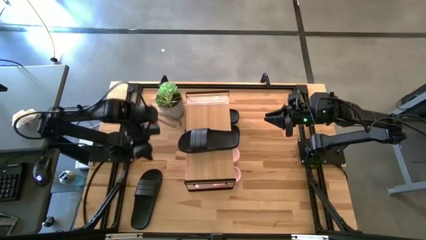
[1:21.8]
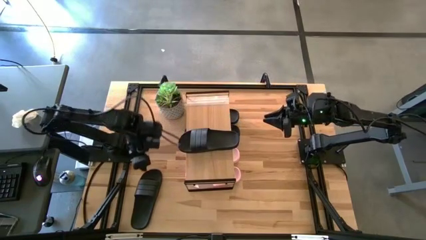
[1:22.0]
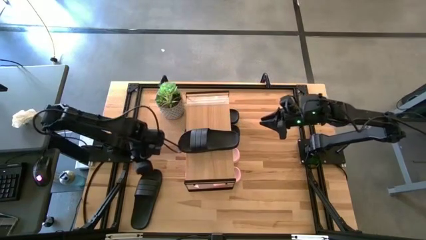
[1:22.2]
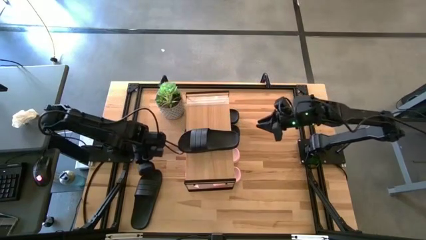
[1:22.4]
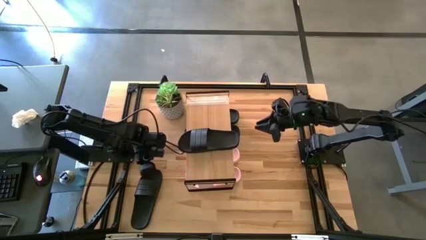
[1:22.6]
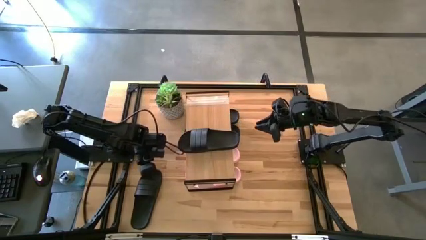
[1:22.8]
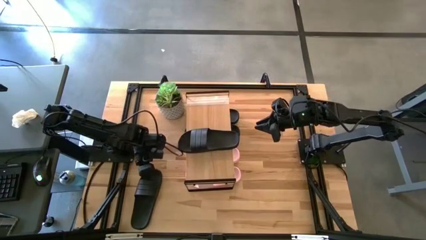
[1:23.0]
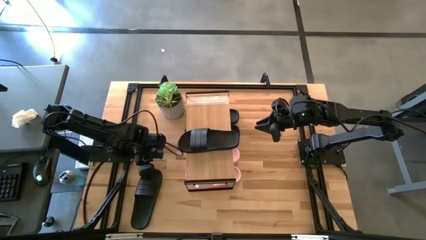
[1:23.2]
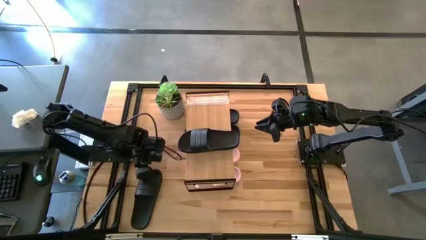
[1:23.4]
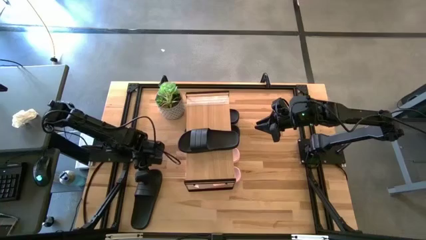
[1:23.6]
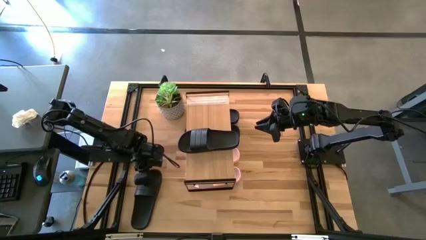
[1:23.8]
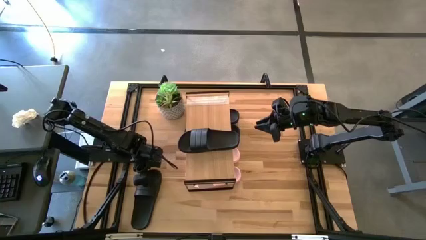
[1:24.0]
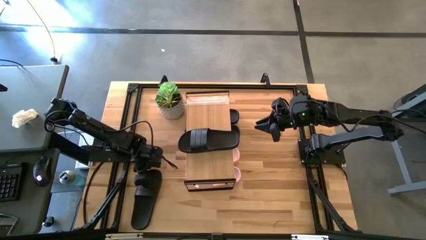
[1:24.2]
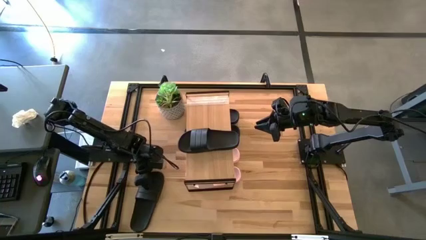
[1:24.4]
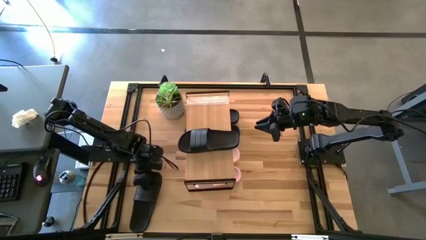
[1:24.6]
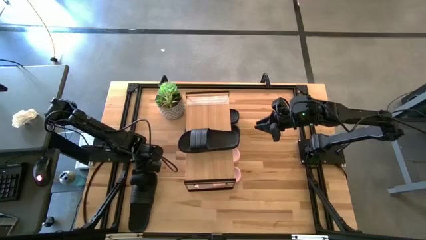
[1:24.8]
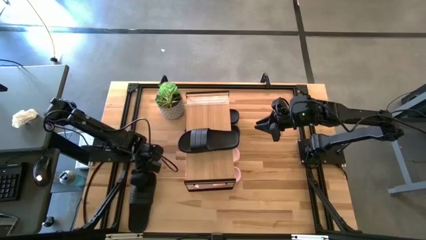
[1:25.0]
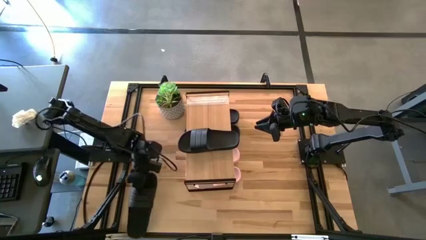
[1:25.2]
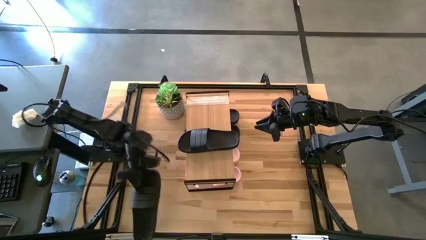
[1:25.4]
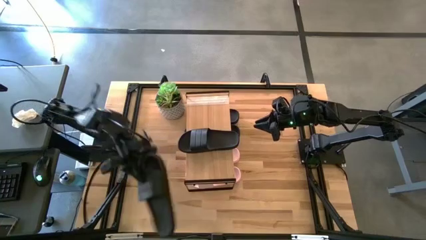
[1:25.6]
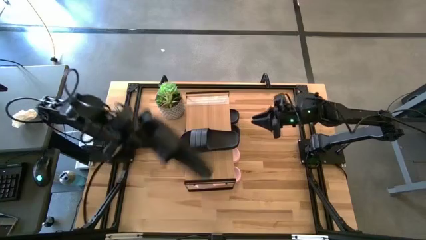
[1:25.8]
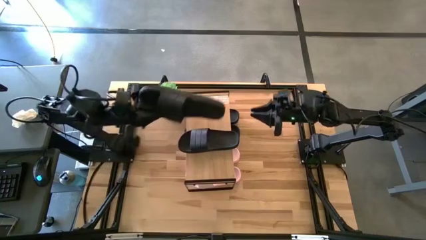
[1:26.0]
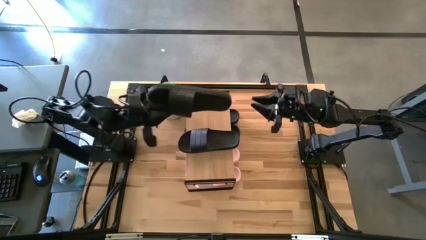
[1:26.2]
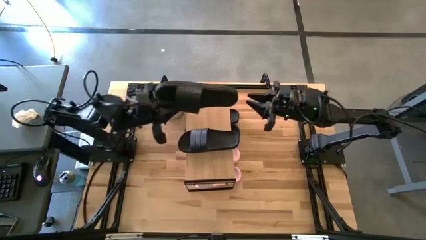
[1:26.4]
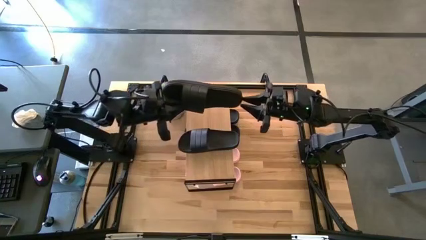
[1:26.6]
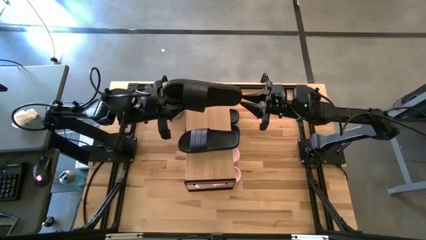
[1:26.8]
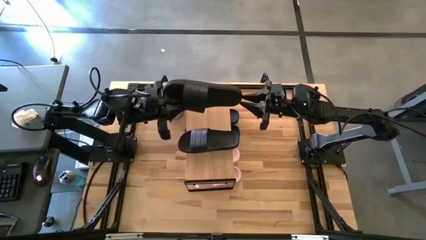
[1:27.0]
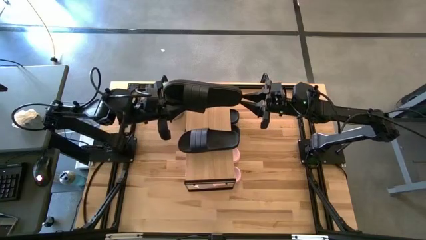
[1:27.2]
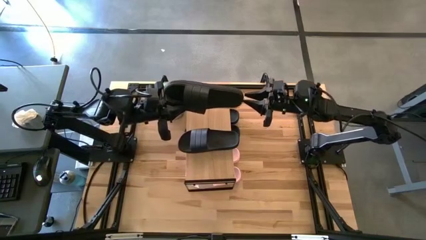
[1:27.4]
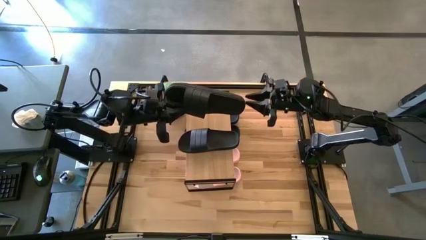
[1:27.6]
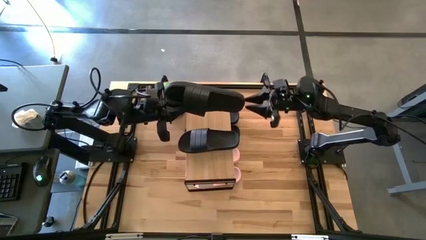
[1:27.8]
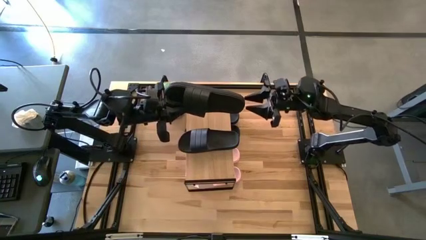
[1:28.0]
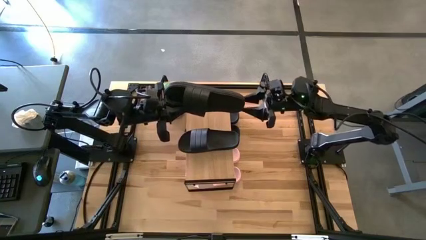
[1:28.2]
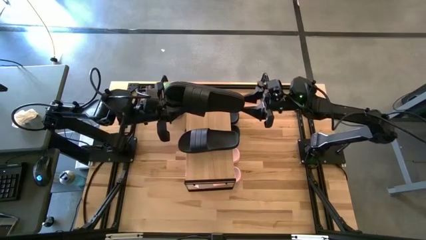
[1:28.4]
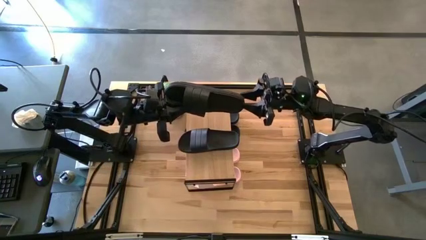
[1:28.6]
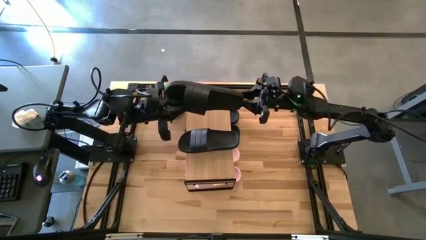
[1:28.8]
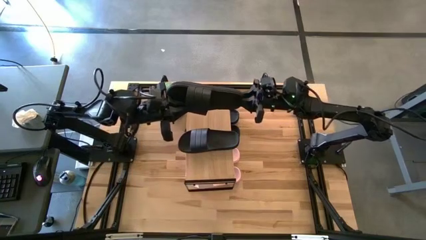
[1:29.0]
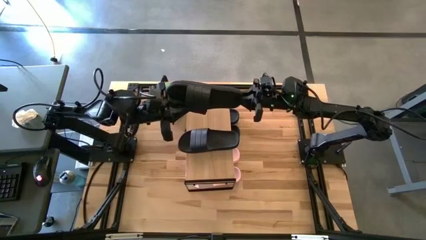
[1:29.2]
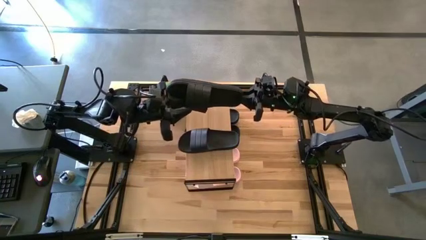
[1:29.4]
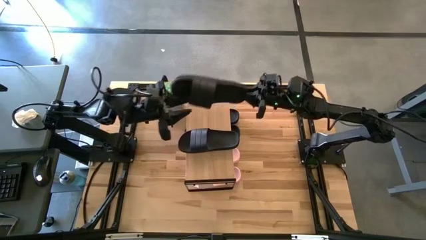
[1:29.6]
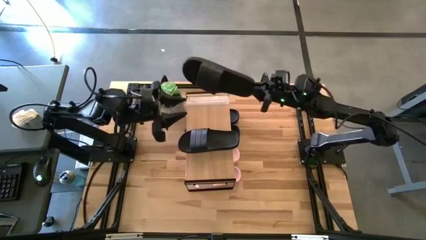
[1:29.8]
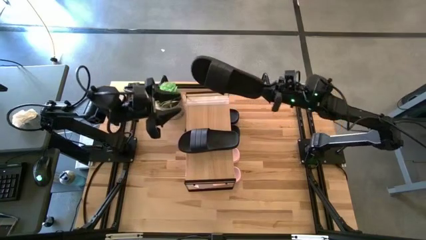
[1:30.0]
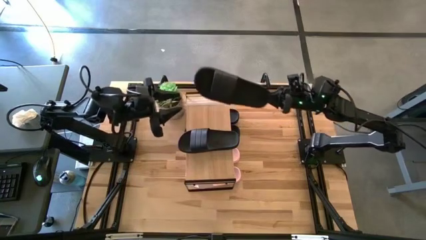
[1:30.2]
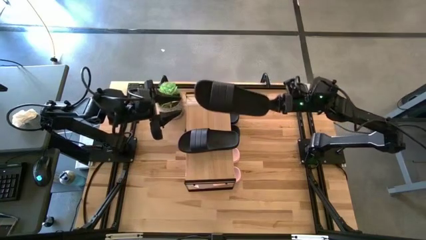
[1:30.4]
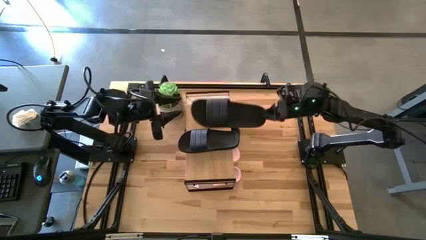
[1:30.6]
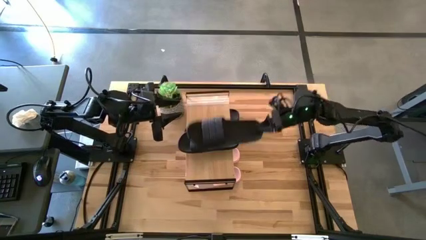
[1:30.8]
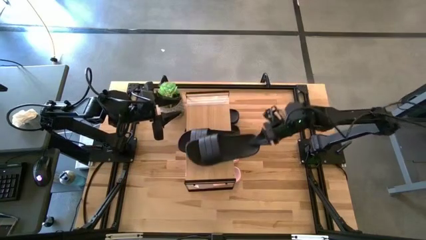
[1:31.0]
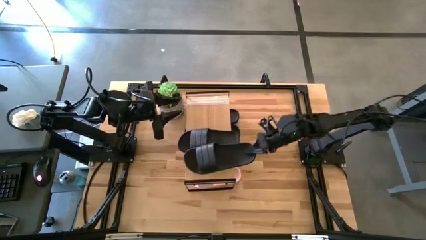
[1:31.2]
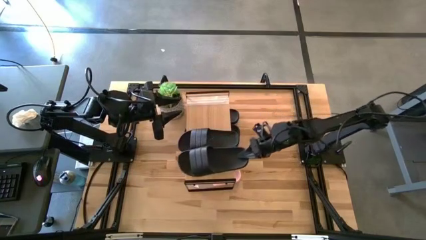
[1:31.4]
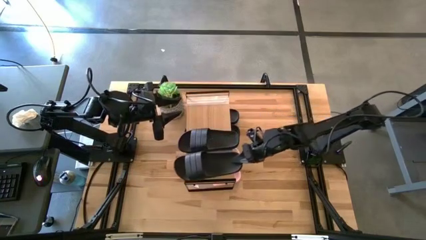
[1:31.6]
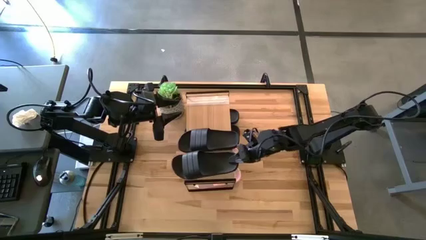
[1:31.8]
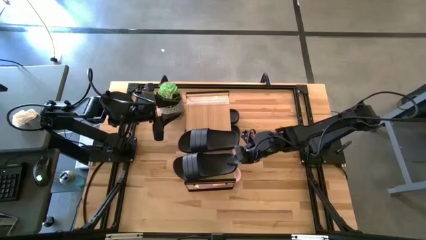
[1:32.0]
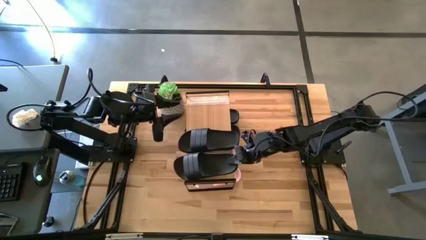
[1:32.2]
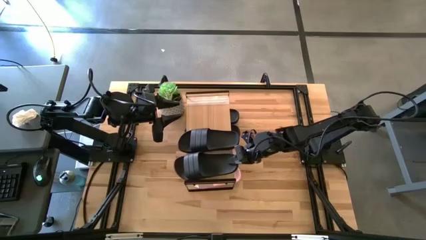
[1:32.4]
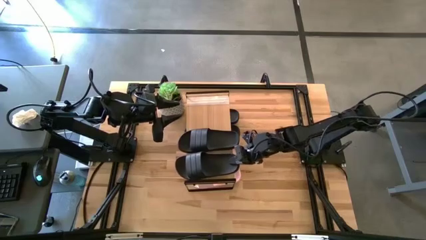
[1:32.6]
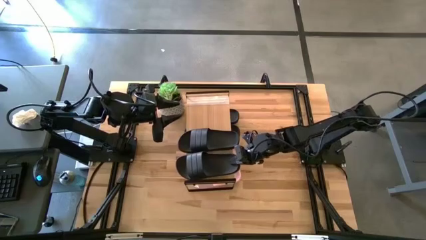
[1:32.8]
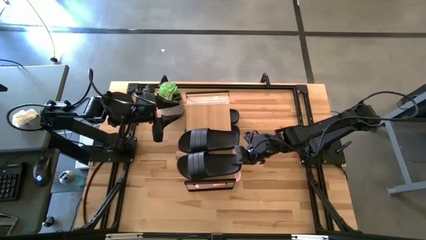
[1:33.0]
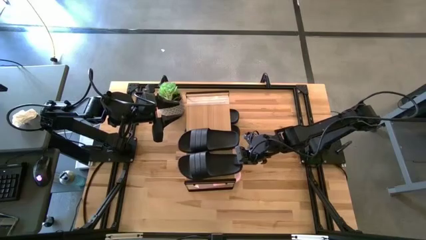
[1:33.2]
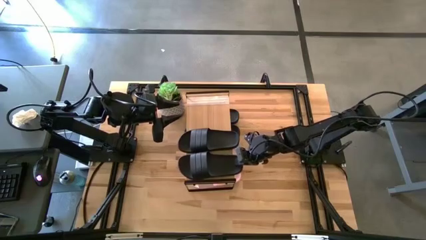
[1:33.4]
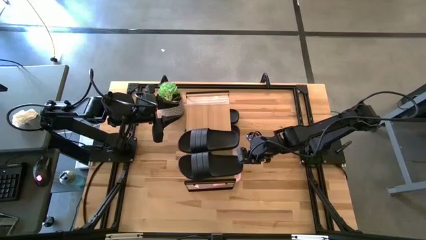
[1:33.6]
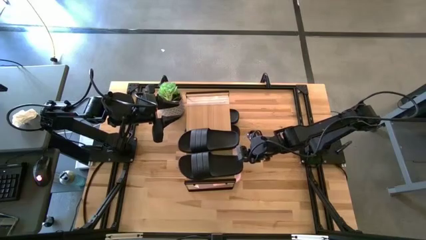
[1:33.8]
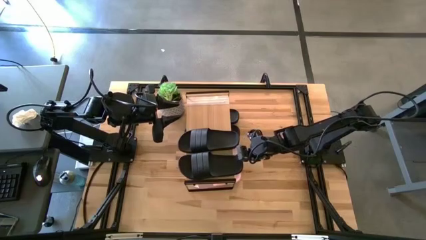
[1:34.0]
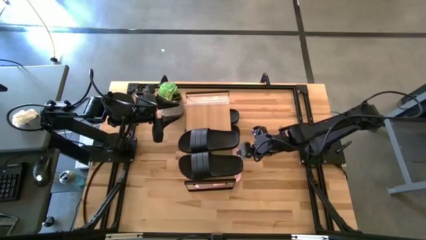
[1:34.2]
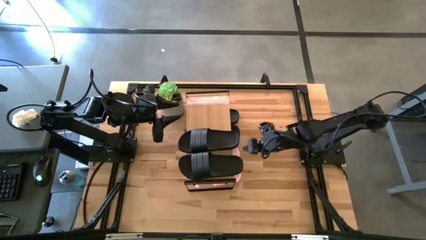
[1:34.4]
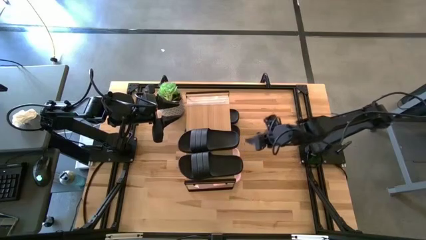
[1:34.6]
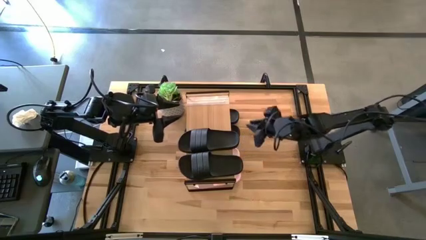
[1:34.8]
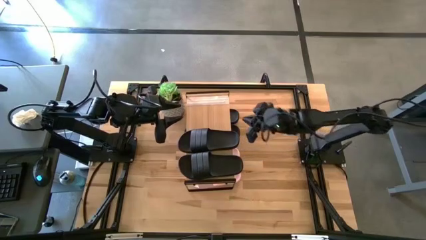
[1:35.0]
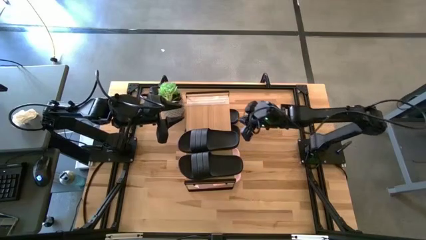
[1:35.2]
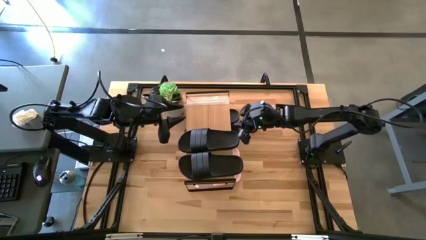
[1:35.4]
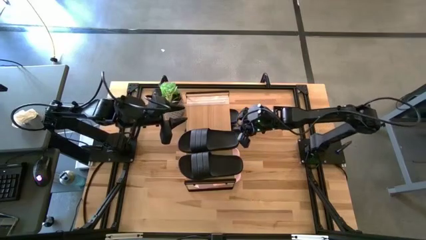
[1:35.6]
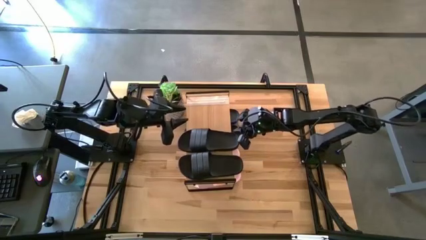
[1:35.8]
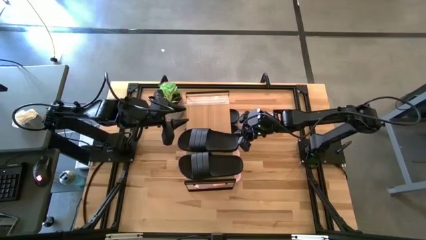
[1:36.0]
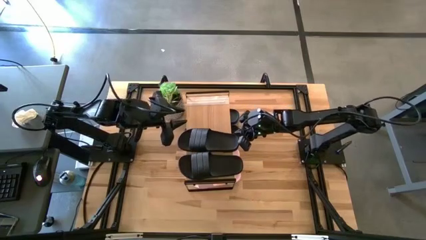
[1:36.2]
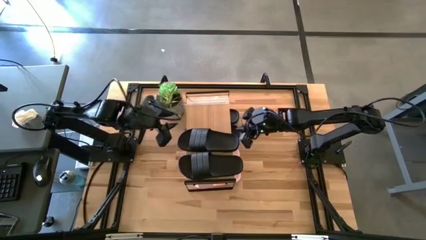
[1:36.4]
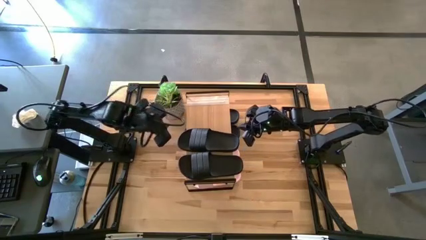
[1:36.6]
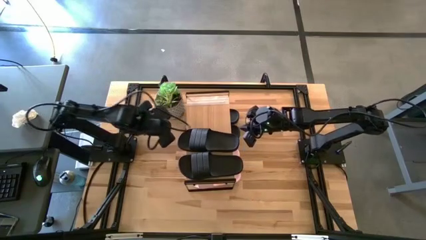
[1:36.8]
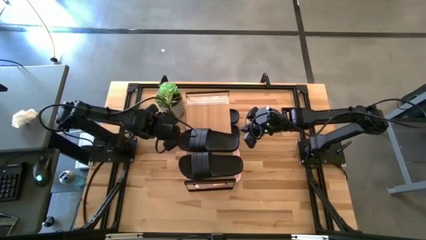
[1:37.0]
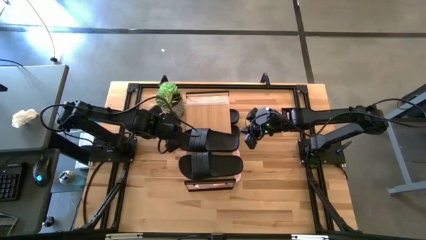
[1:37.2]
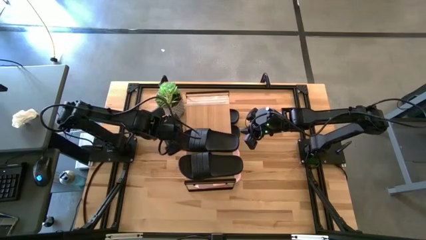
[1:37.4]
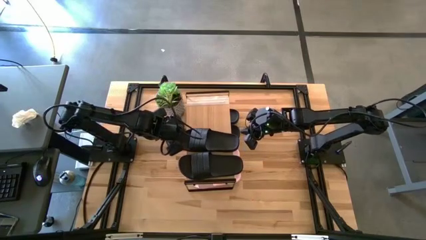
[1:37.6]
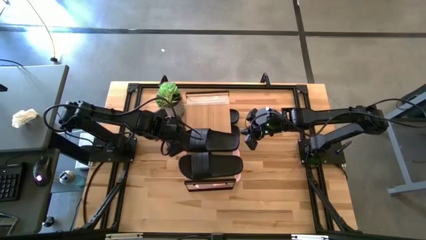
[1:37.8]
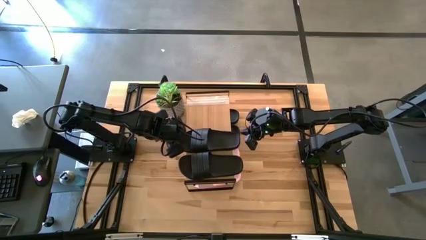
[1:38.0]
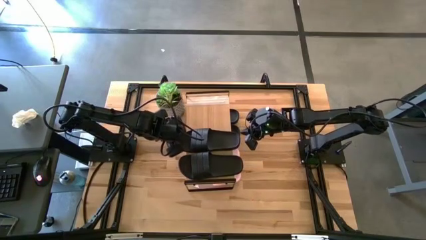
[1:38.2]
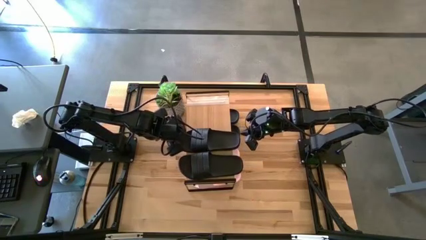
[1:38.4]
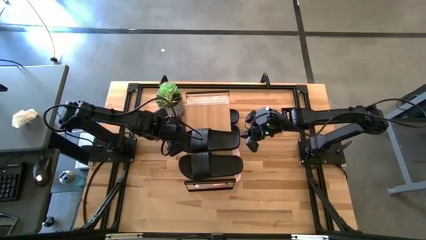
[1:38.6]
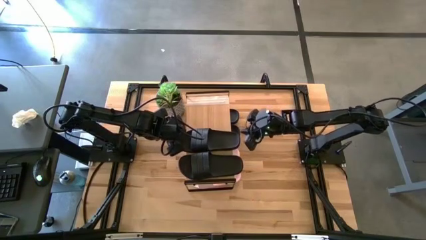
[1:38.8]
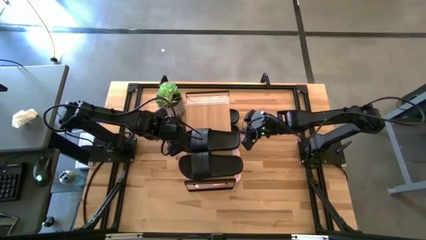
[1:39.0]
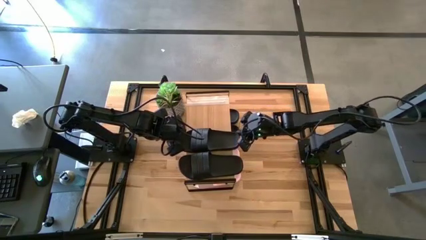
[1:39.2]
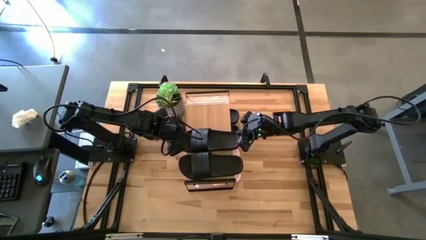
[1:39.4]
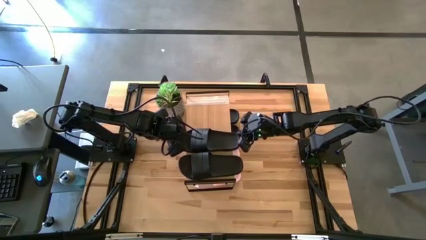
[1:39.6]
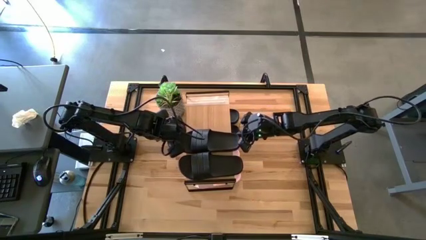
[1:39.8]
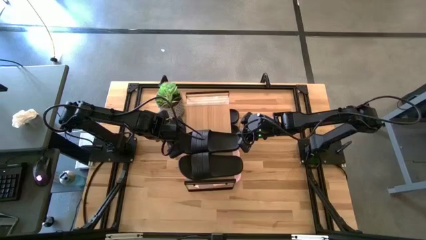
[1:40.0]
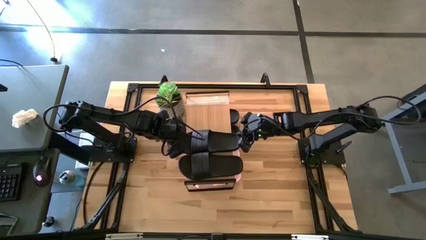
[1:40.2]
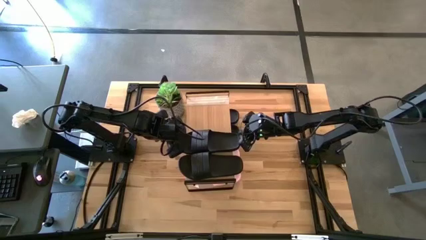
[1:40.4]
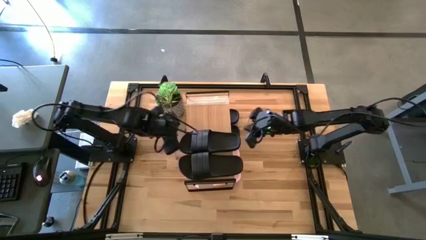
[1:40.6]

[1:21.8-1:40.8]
Task: Pick and place slides into the shelf
Put the black slide on the shelf
